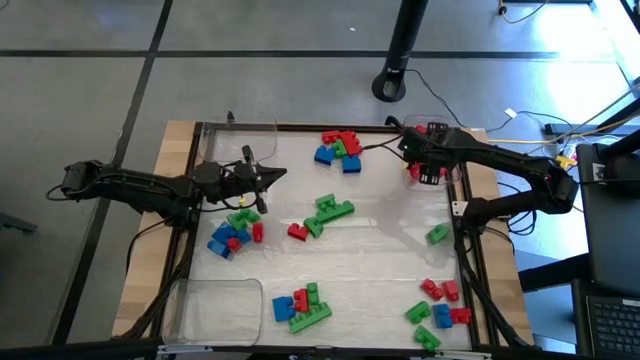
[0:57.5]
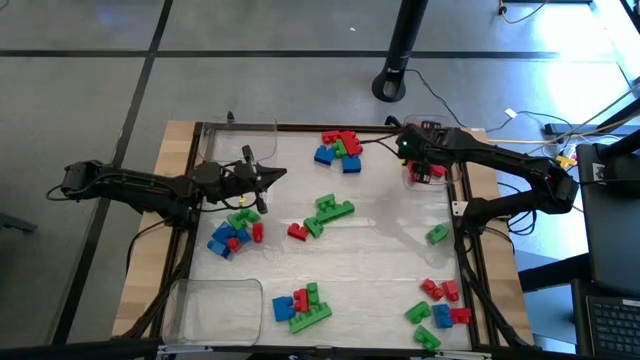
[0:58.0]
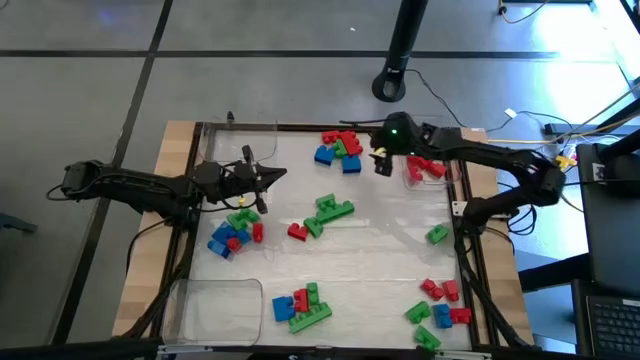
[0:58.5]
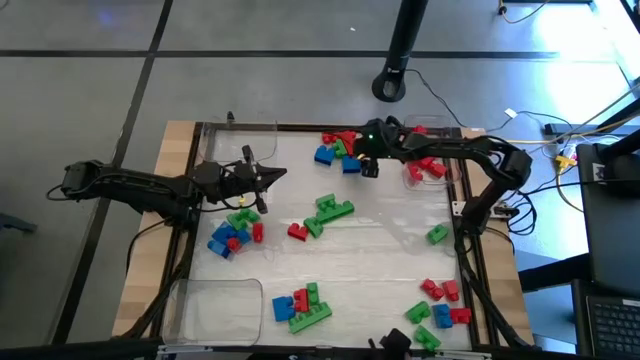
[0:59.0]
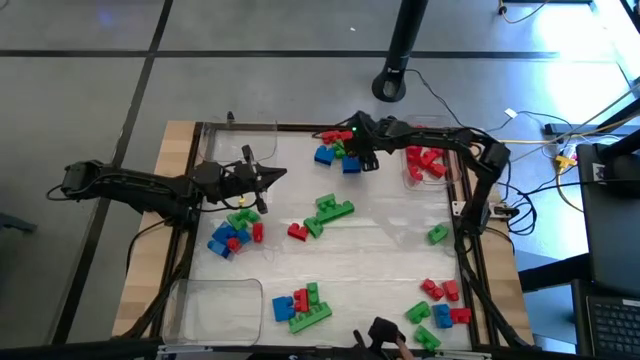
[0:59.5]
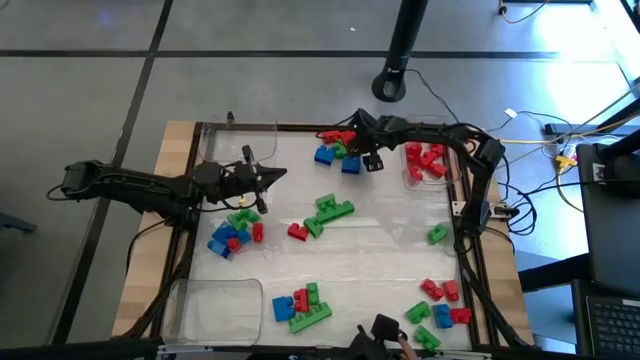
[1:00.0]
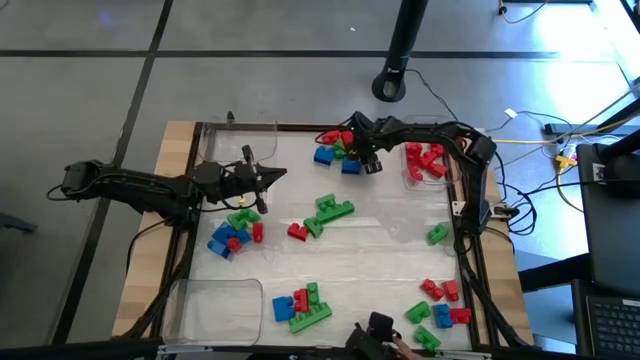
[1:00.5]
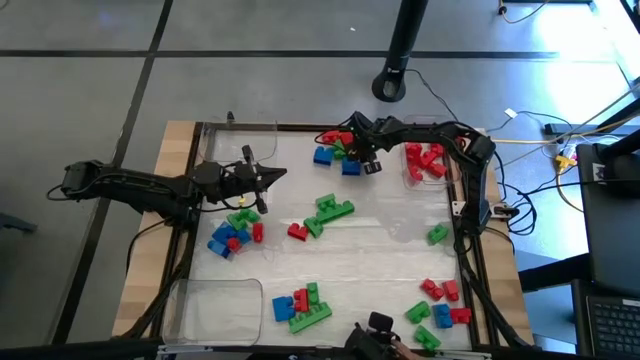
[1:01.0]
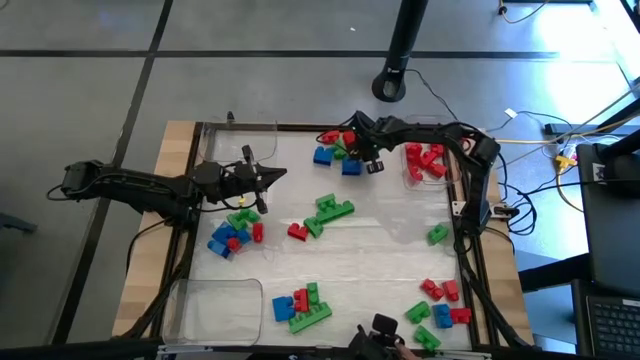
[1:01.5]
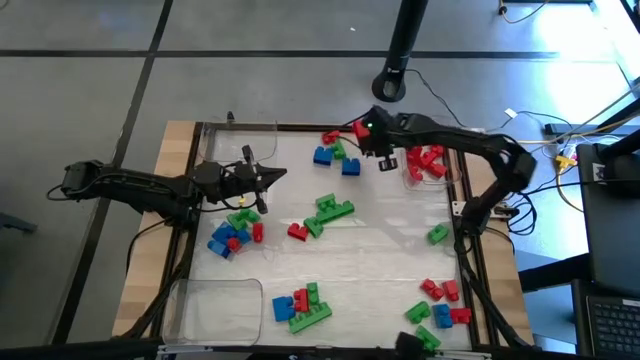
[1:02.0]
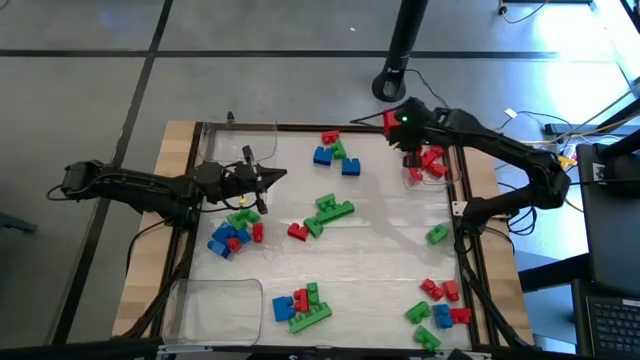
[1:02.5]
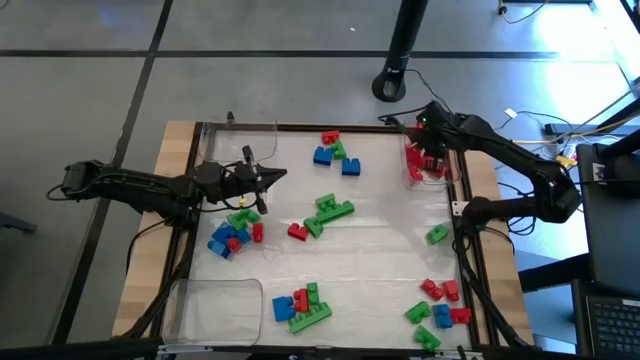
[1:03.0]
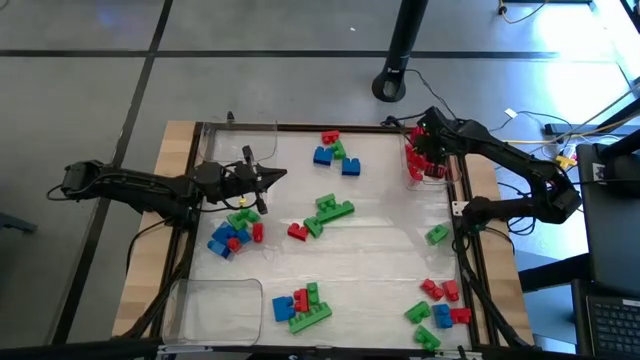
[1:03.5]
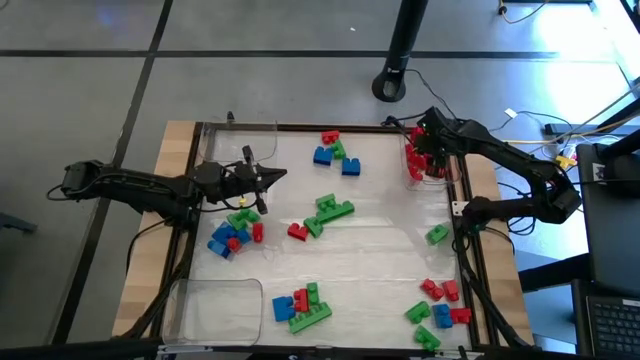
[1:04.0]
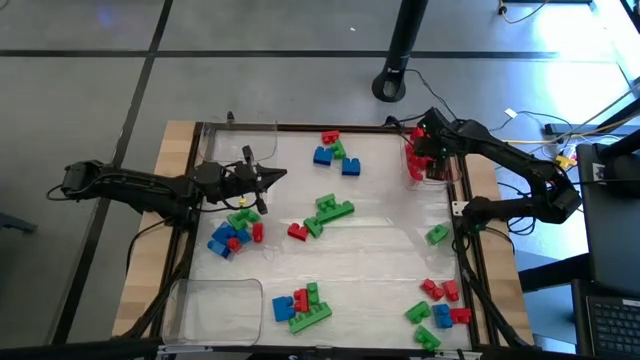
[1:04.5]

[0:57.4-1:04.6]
Task: Sort blocks
Put the red game piece into the right transparent bin

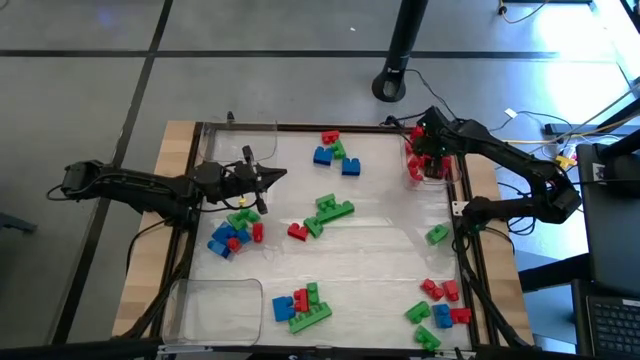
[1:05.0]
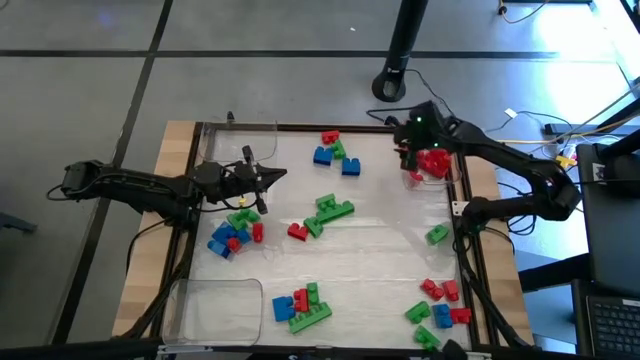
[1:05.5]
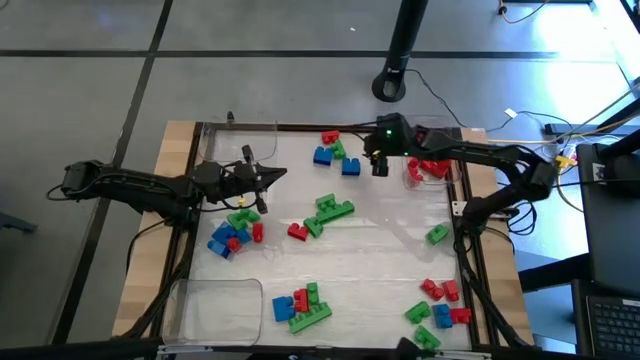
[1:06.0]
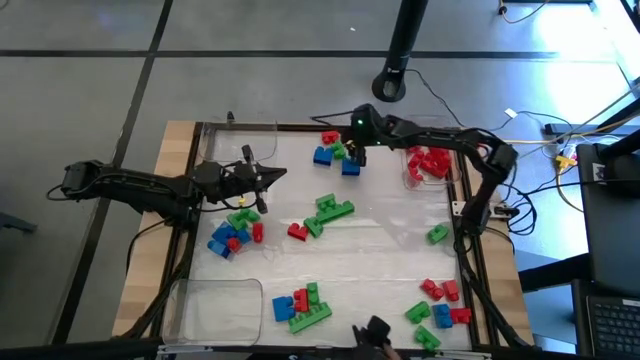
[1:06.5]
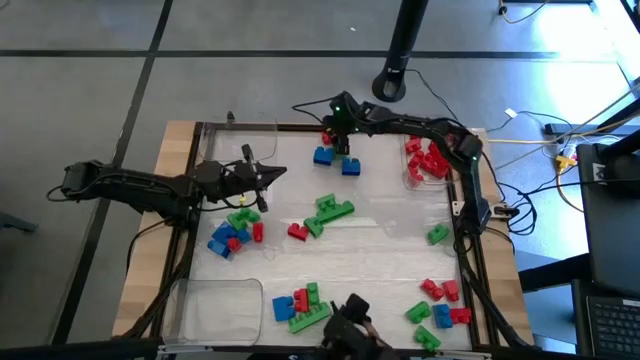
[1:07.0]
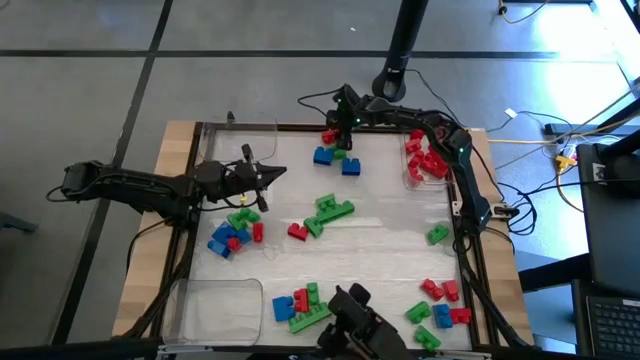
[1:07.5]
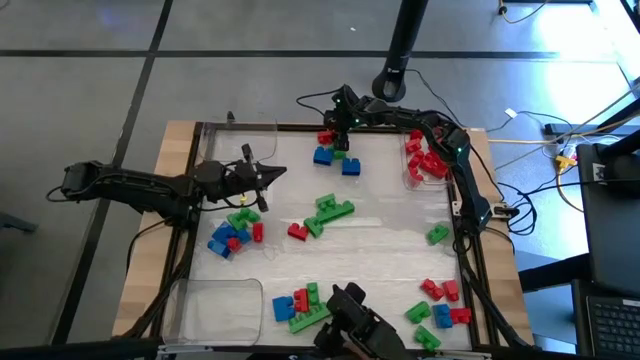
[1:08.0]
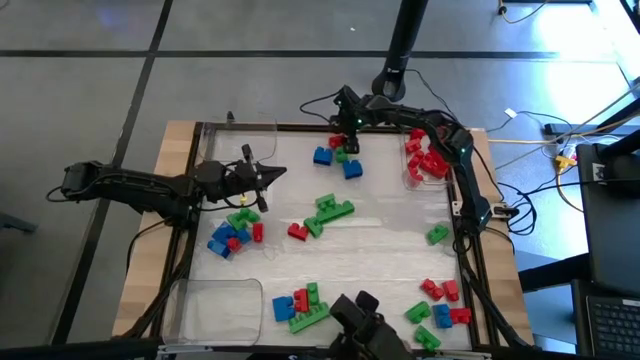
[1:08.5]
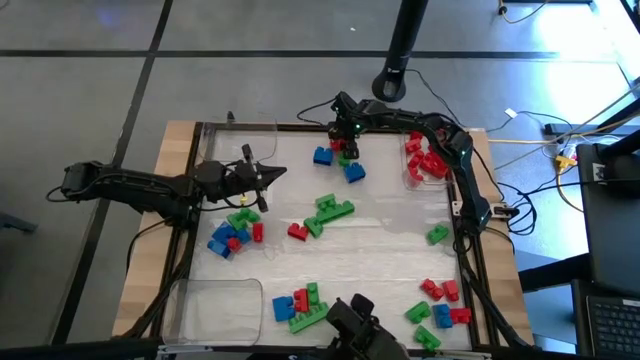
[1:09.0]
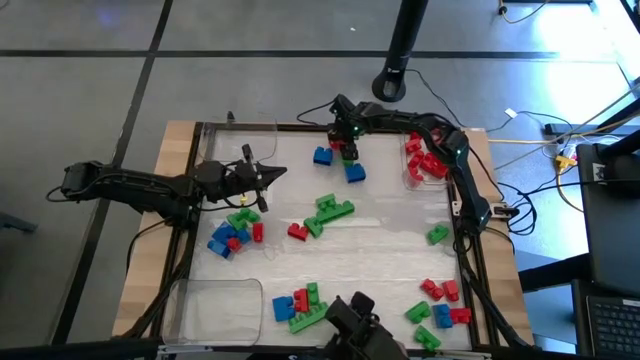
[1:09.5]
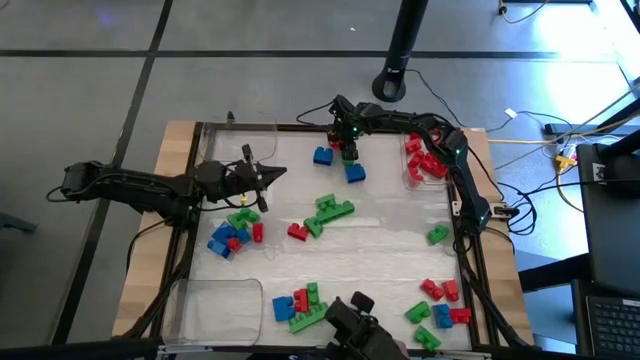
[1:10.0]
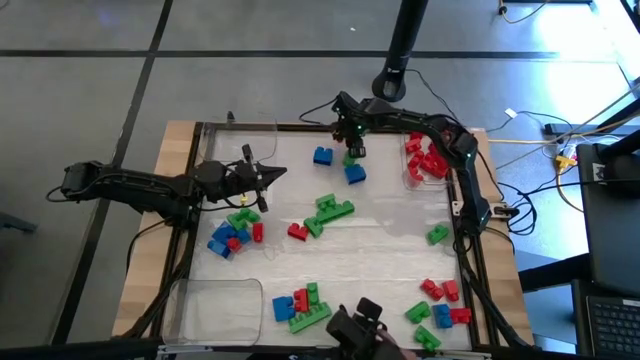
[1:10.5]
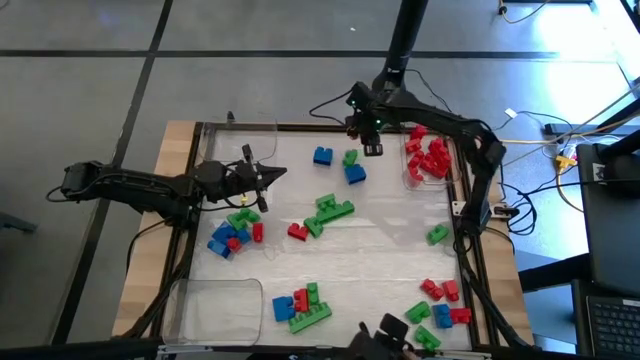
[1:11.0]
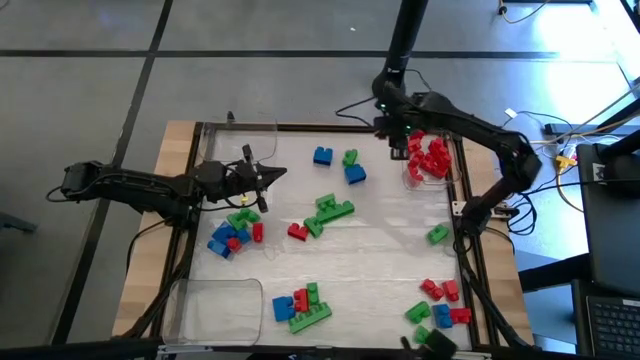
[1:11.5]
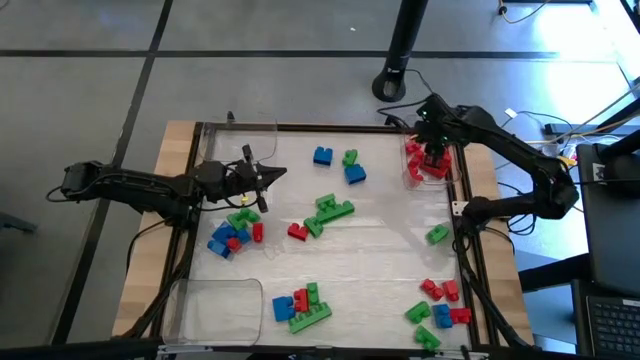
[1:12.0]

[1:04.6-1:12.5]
Put the red game piece into the right transparent bin

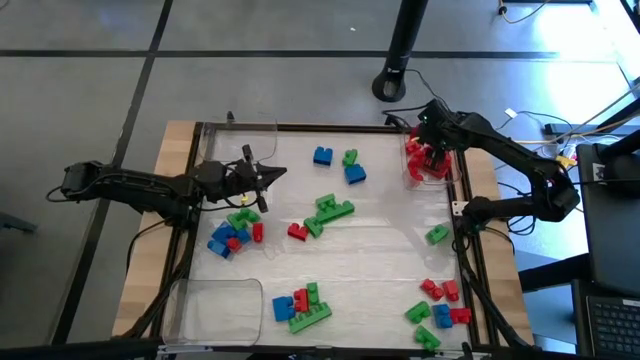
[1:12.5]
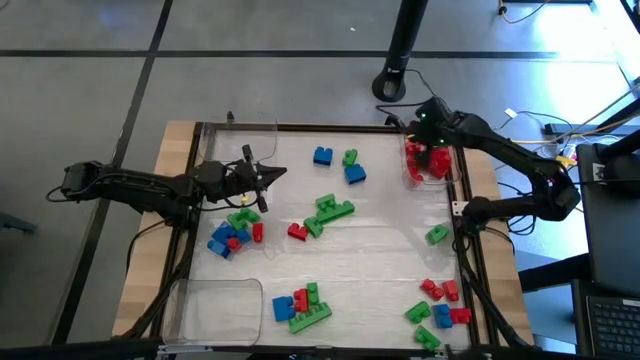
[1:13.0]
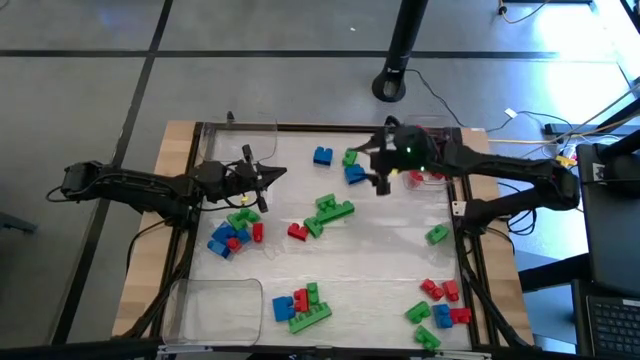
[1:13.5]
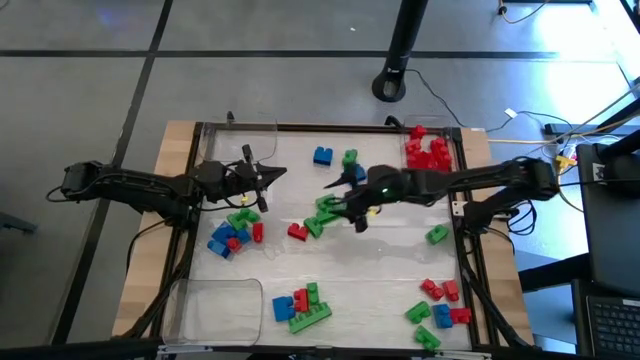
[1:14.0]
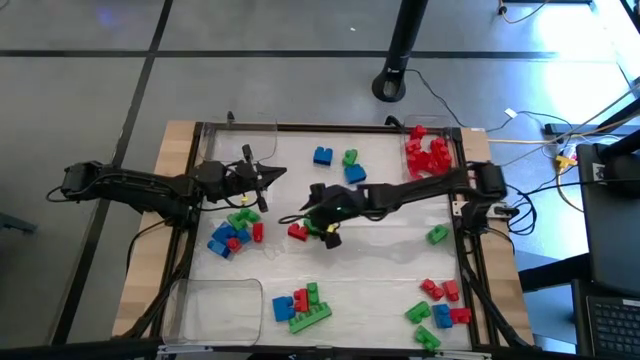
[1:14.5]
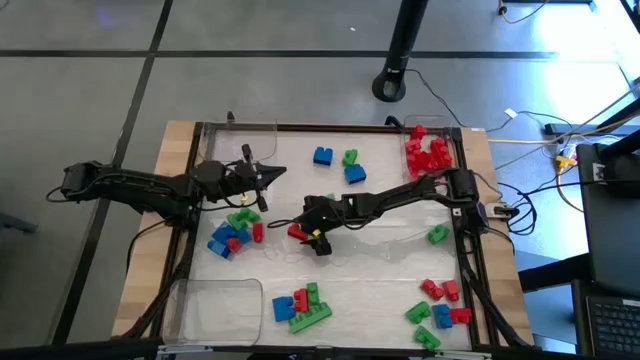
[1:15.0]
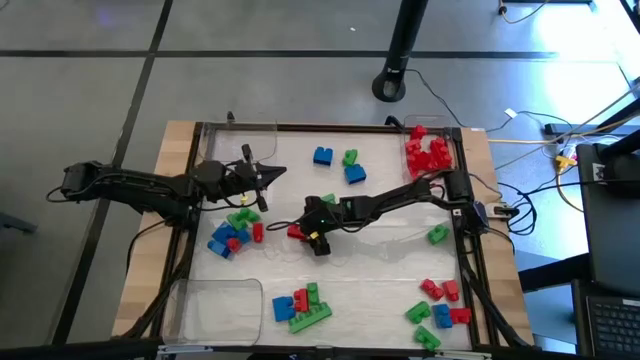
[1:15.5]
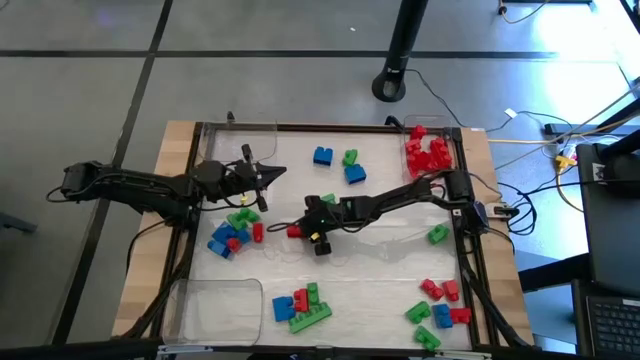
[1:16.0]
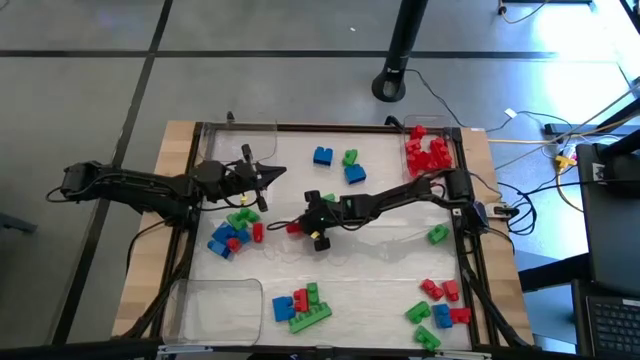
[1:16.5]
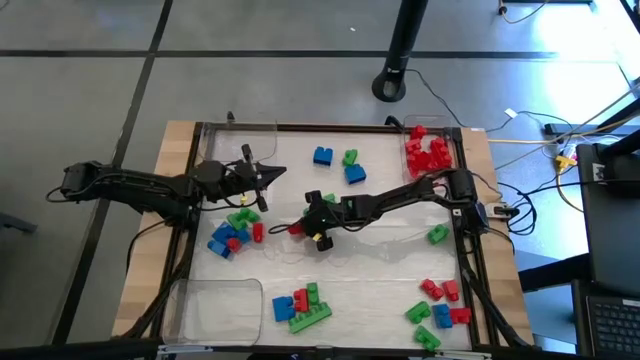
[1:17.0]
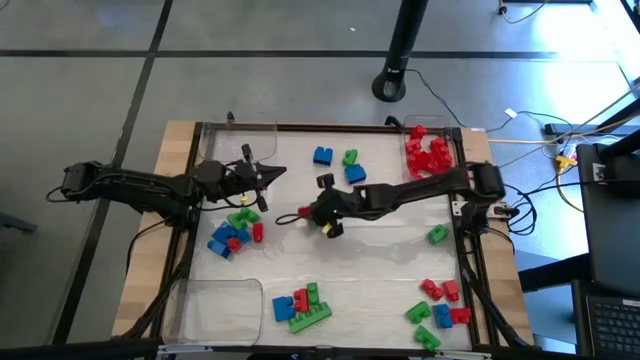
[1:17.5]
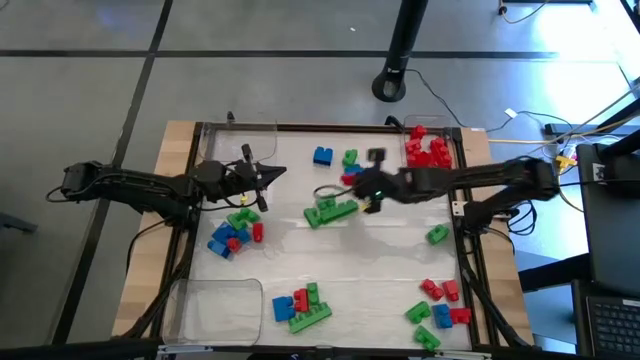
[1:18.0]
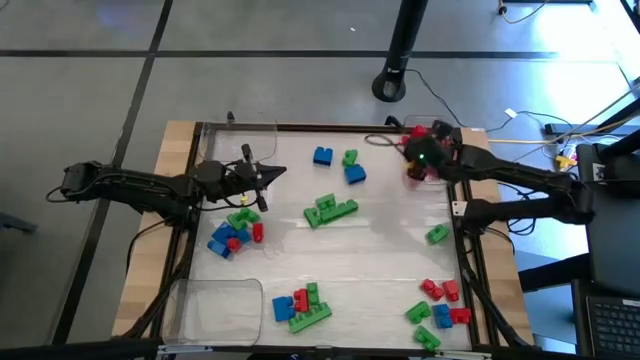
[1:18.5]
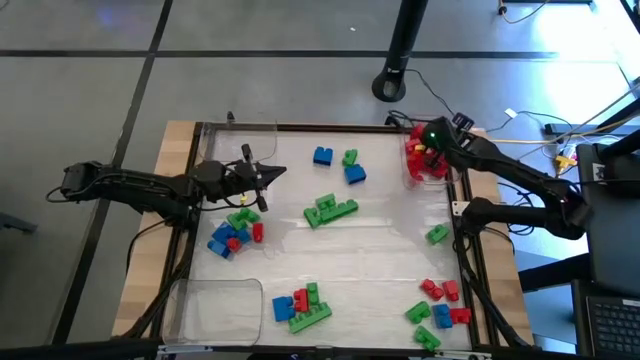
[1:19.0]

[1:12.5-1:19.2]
Put the red game piece into the right transparent bin
